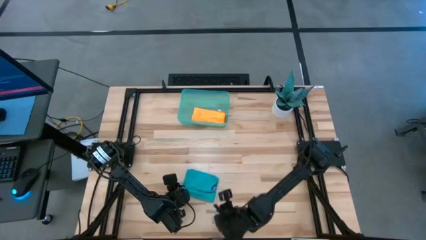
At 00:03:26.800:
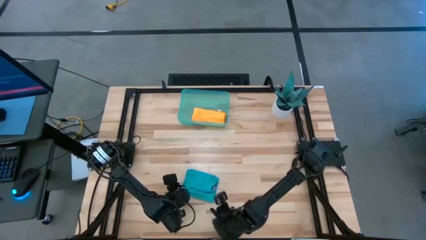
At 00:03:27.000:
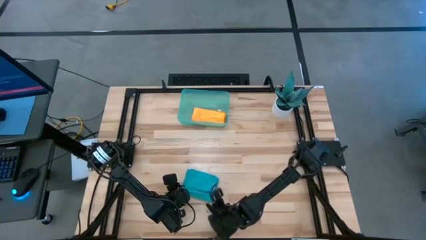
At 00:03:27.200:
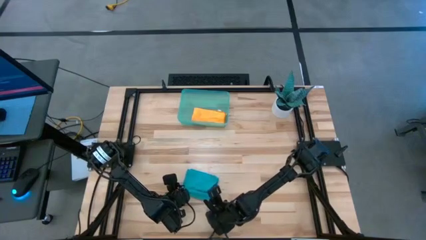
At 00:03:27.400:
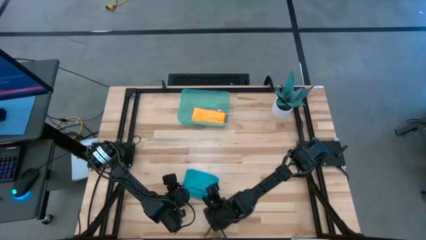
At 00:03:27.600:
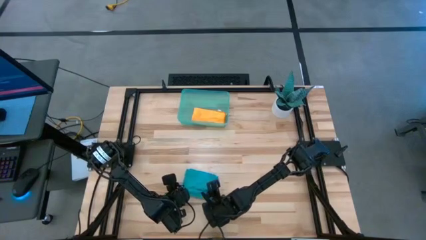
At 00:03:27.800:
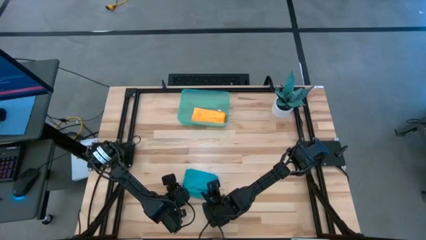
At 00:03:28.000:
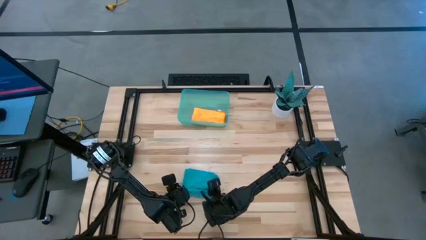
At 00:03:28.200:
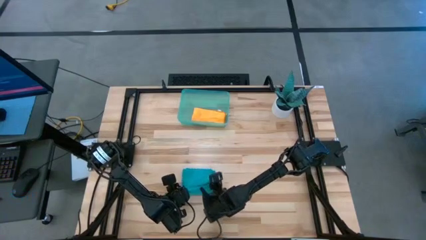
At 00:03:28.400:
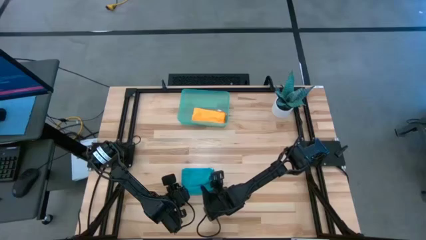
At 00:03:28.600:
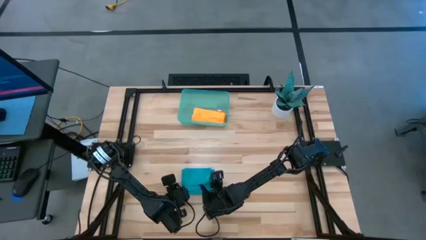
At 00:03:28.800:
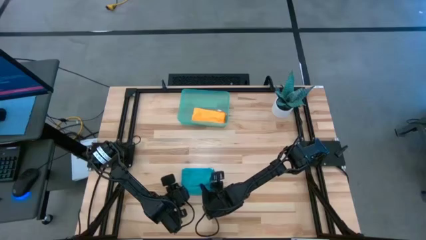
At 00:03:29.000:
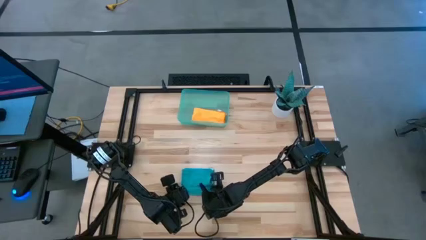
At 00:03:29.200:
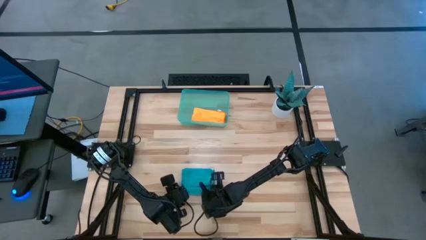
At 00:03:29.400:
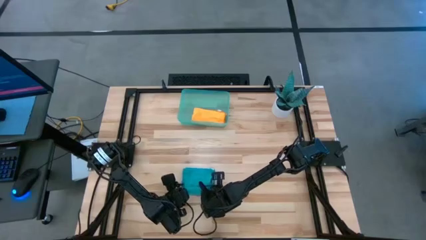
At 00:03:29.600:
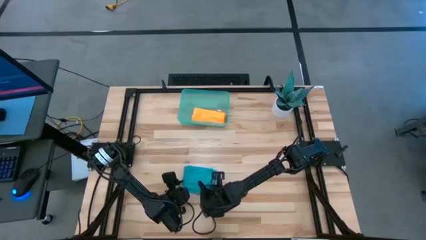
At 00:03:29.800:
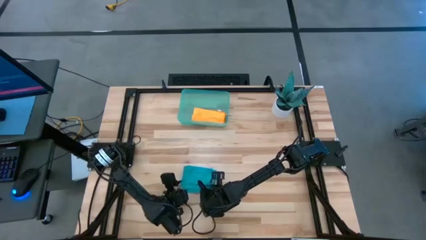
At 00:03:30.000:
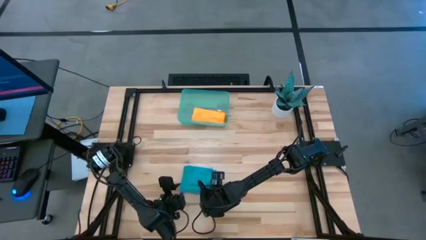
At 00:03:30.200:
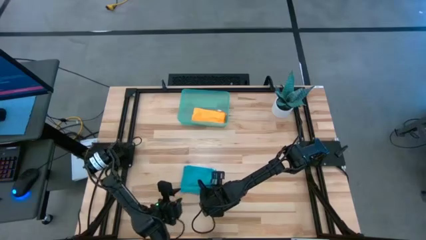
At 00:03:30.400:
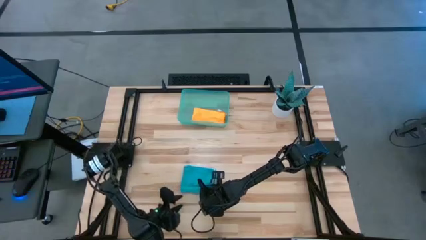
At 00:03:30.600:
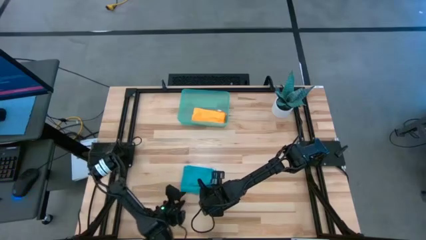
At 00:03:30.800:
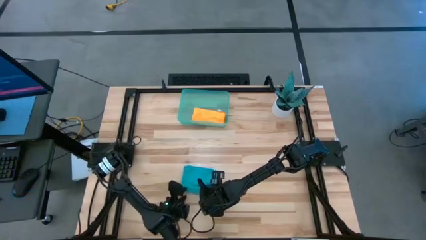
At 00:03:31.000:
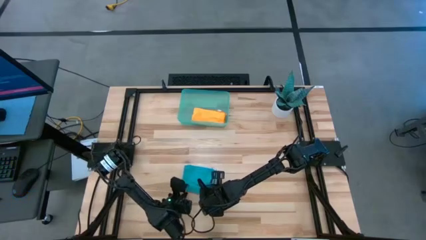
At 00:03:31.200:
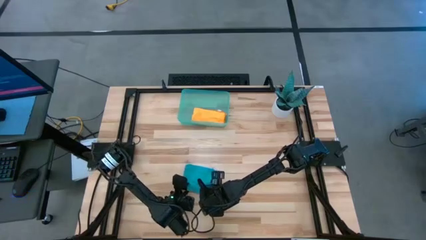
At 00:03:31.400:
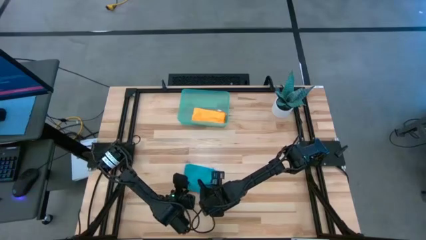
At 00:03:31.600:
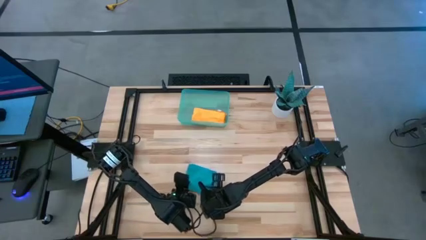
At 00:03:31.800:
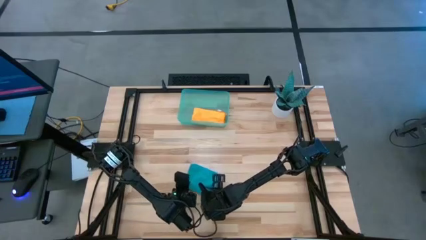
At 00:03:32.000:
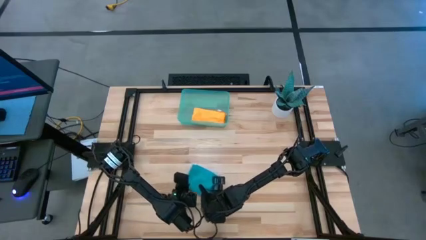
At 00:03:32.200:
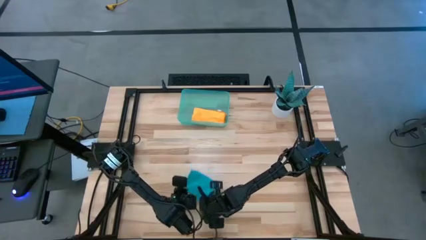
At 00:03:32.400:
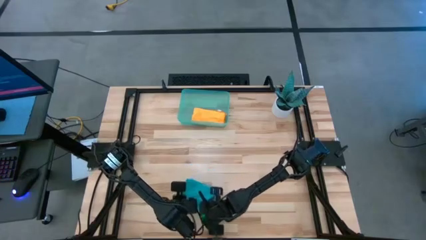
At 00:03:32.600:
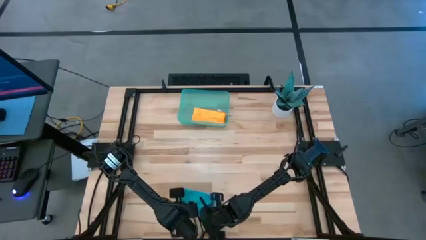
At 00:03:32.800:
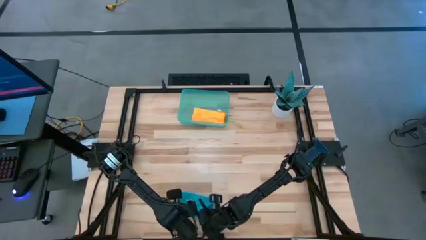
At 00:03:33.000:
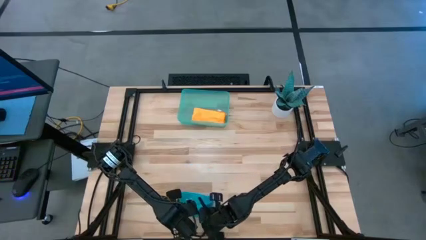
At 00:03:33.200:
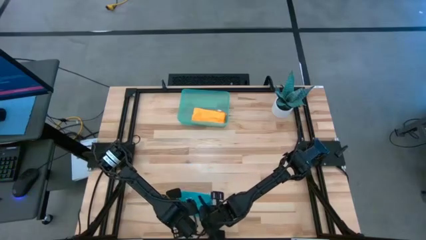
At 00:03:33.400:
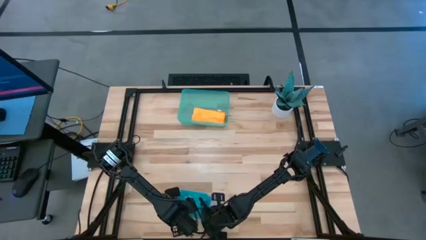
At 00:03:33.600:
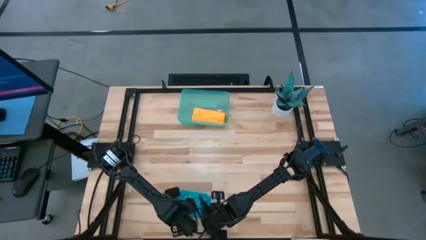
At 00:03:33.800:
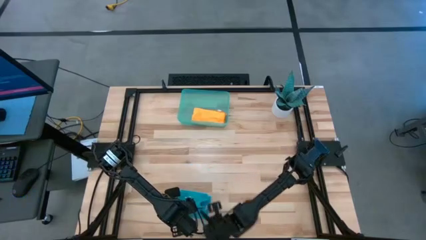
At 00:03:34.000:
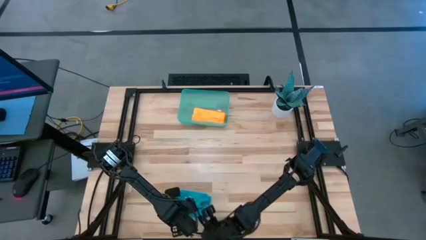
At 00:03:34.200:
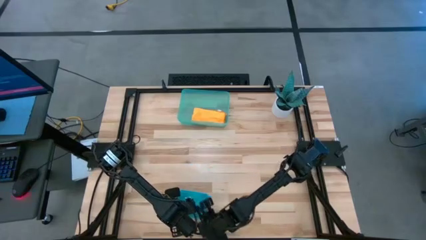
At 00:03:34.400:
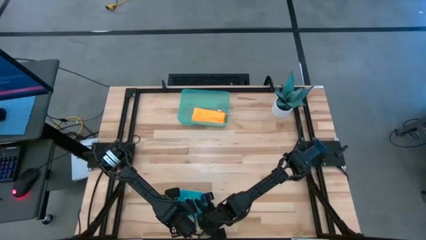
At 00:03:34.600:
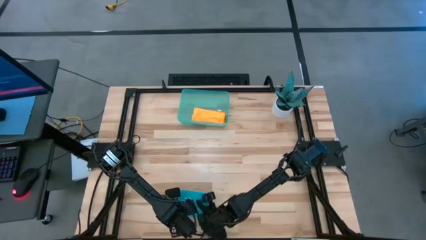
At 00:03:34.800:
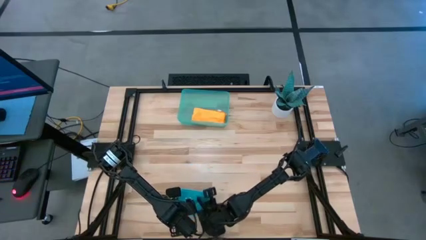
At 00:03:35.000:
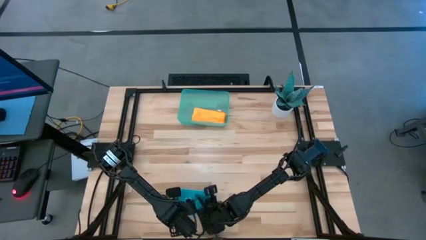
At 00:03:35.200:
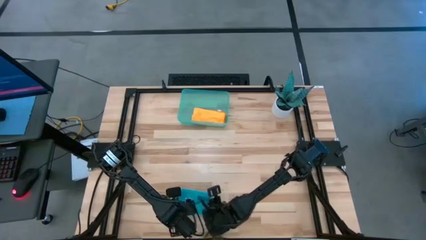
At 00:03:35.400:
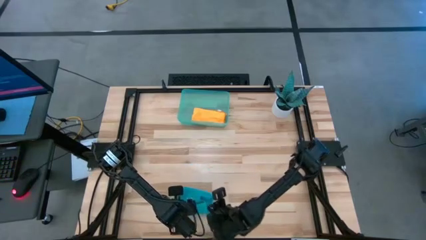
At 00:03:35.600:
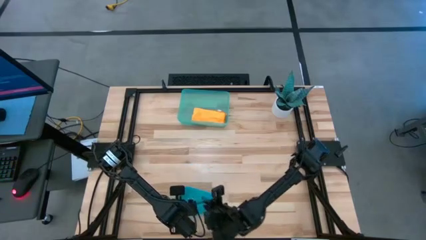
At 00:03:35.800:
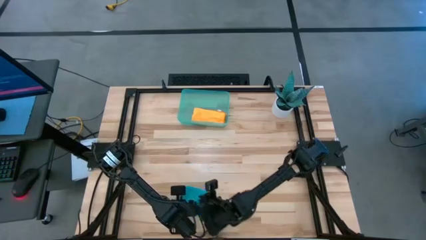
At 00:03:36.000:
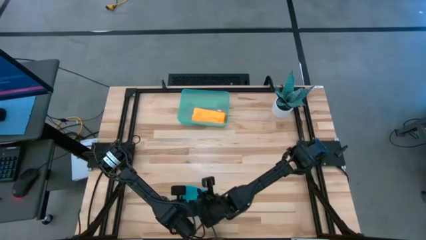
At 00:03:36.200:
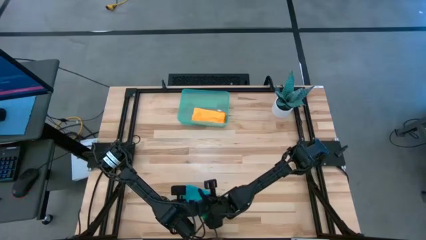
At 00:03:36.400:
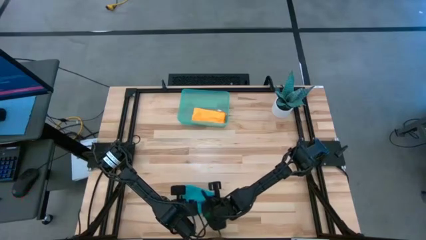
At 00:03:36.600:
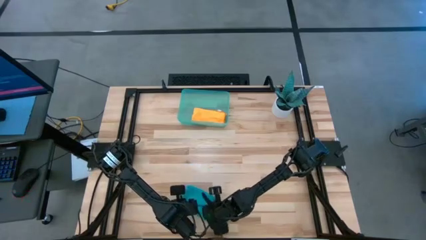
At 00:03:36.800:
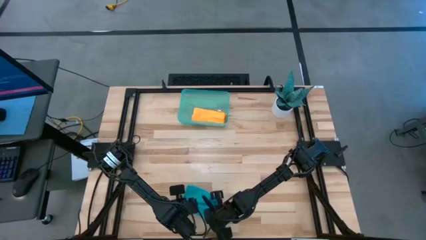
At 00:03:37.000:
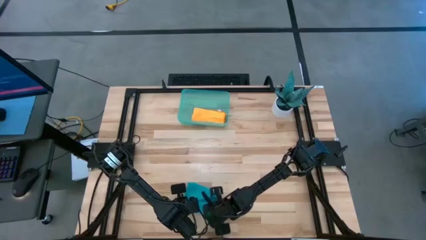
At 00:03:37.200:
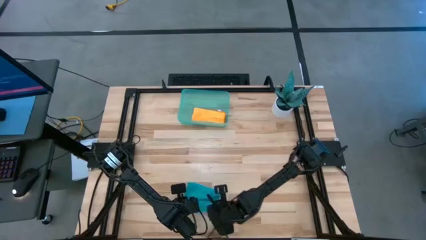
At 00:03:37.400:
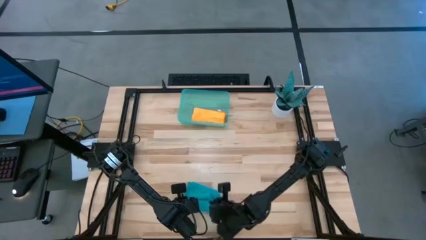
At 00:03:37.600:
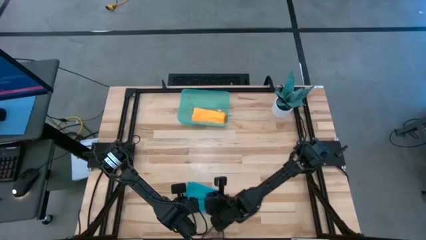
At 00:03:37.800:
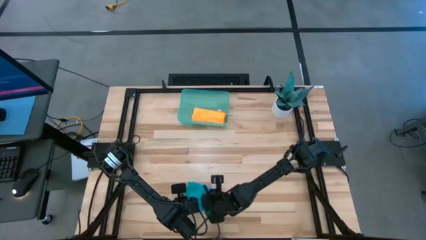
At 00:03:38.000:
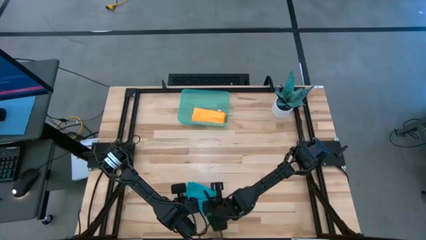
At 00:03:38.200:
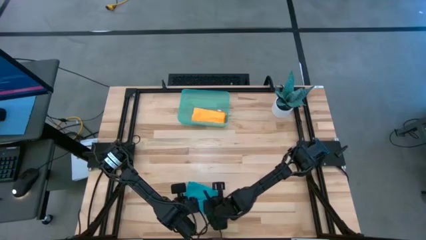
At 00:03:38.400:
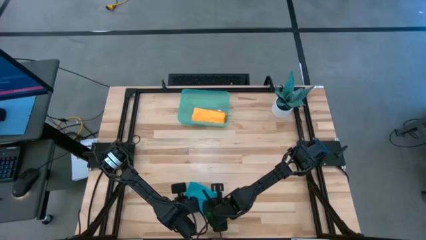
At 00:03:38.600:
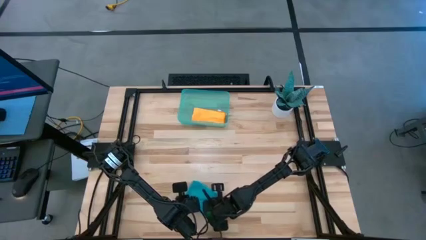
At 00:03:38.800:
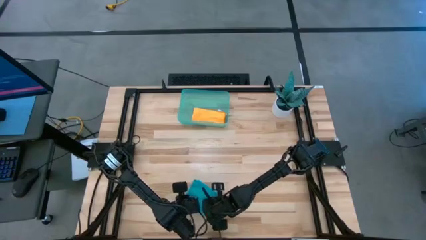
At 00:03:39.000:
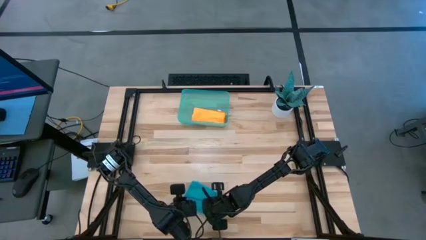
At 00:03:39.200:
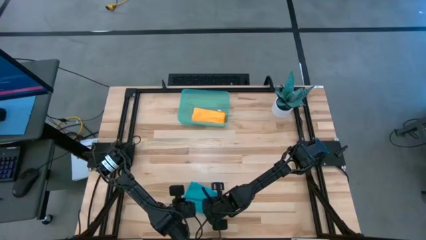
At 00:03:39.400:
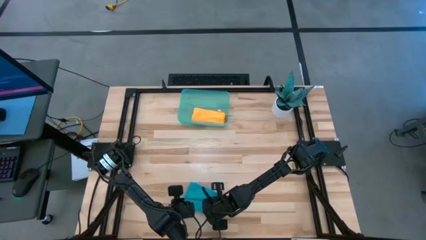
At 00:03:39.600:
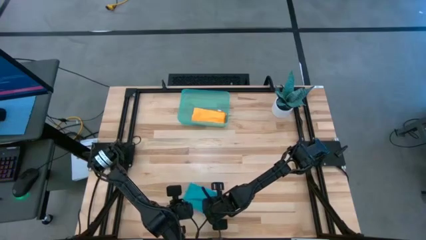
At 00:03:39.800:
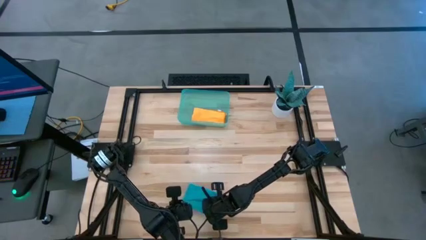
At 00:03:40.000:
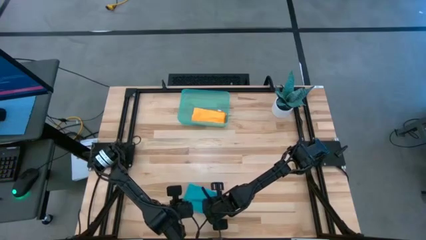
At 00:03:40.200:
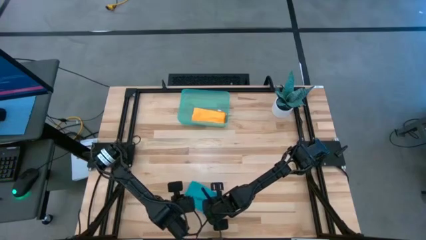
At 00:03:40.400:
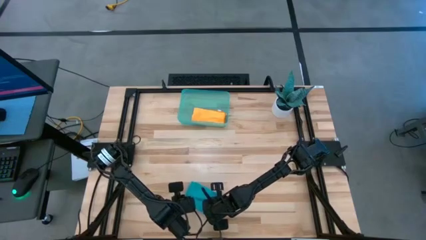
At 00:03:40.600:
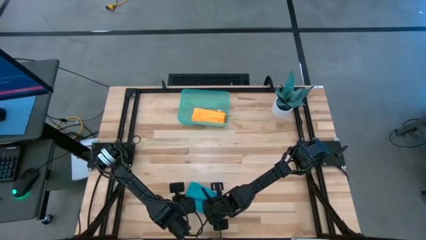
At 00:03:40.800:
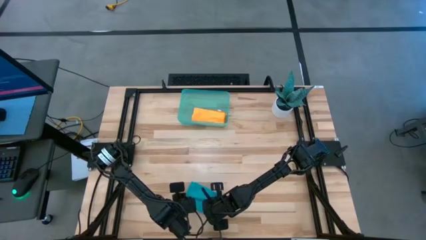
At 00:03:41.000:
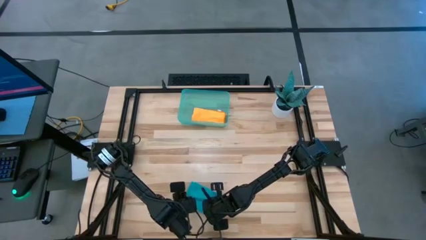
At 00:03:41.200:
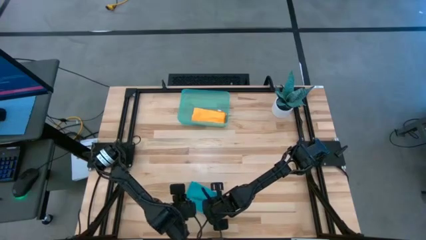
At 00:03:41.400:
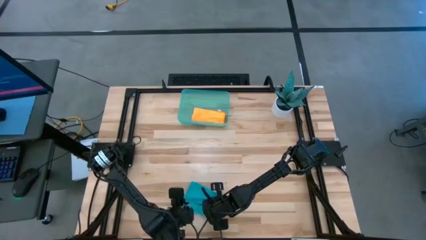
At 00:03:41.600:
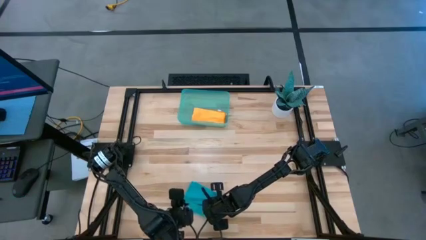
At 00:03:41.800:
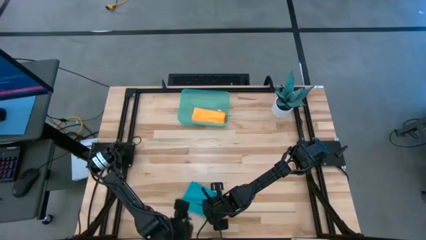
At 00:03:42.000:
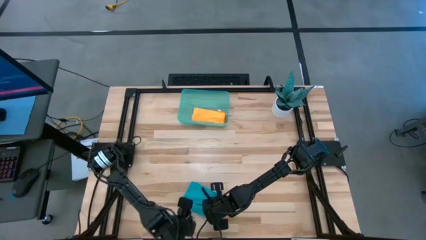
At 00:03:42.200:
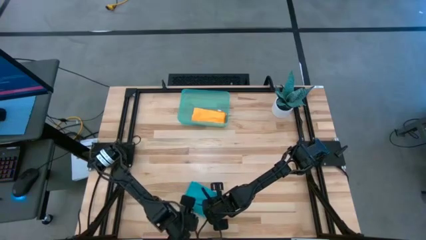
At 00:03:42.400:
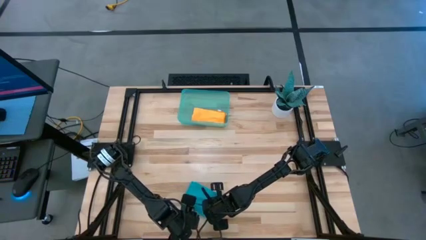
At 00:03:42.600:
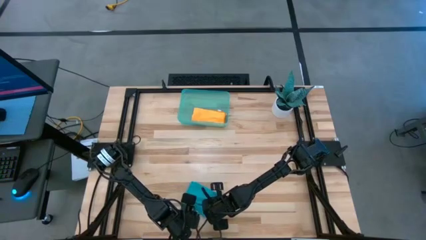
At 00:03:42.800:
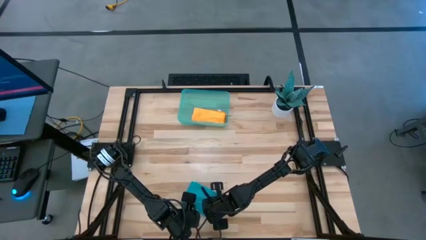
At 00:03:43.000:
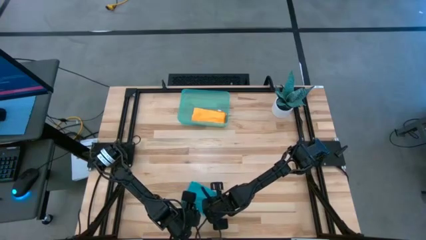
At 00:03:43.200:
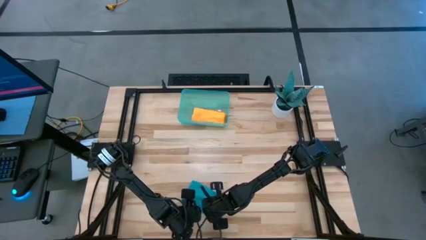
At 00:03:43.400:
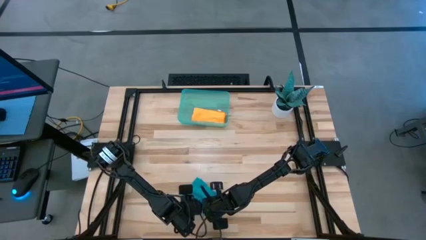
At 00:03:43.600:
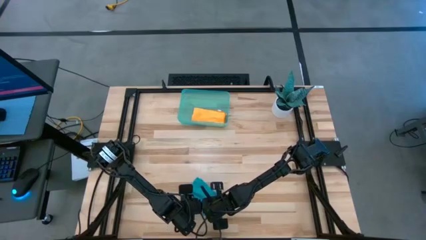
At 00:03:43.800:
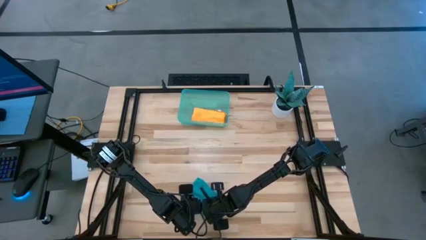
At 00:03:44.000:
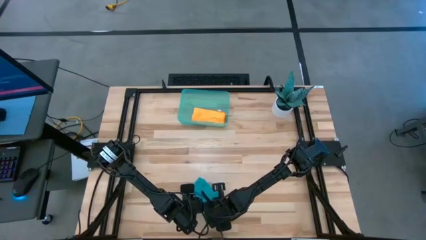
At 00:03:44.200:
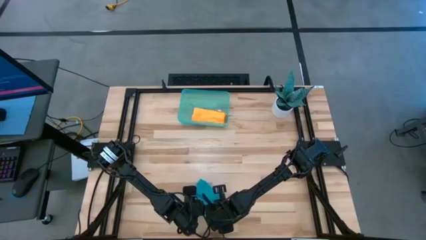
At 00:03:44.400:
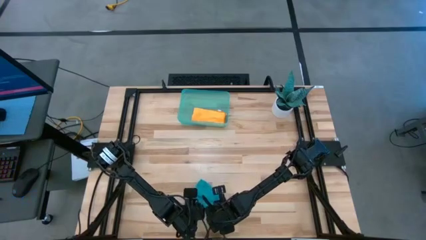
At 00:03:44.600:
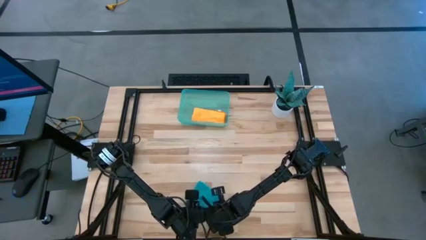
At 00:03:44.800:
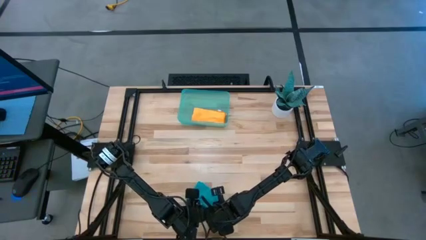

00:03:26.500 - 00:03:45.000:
Task: Roll microfiber towels into tight, uniform cylinder then place into a basket
Roll the blue microfiber towel
